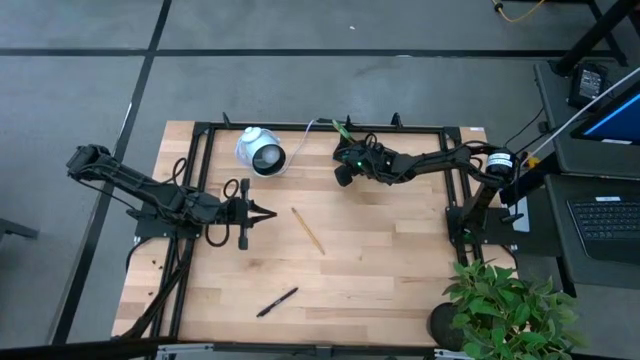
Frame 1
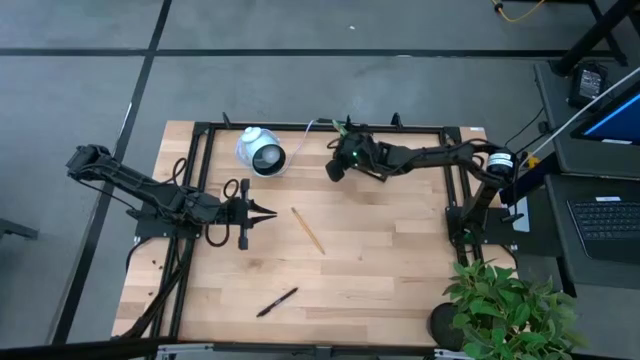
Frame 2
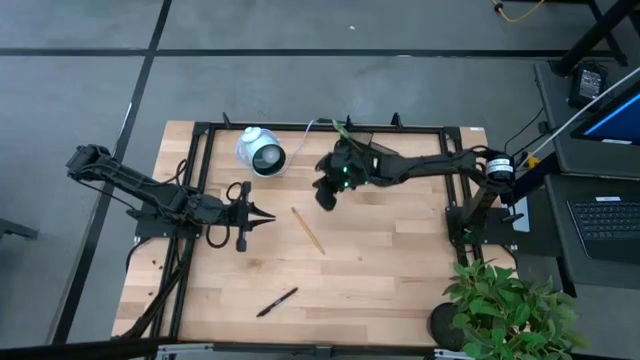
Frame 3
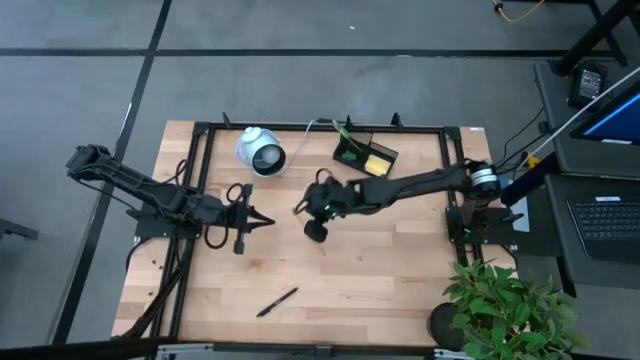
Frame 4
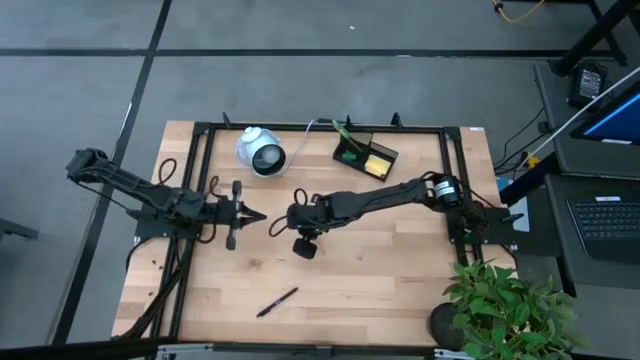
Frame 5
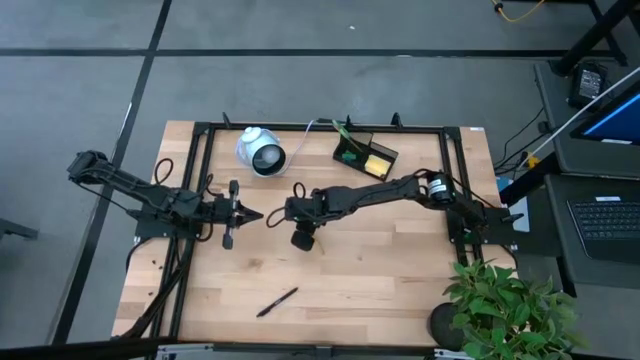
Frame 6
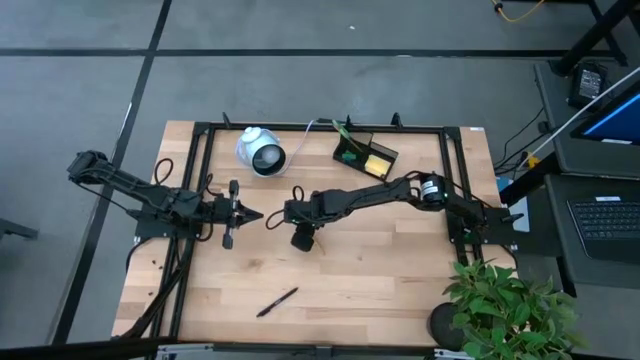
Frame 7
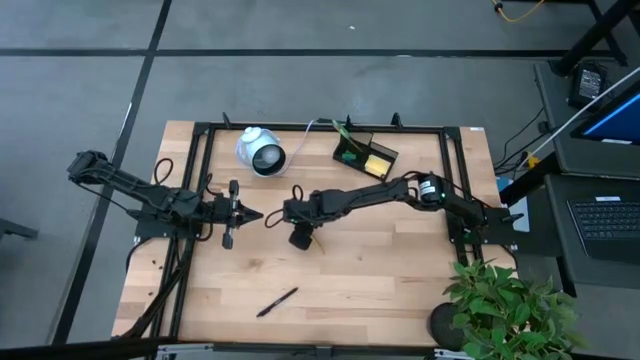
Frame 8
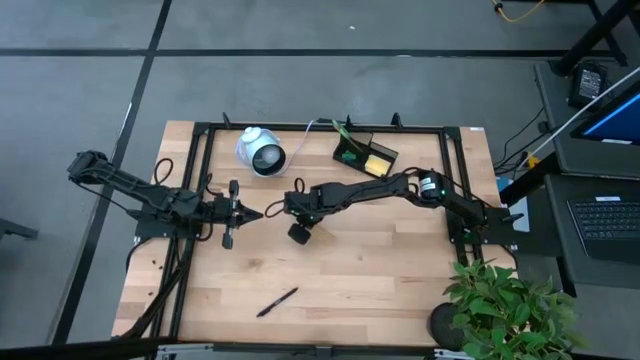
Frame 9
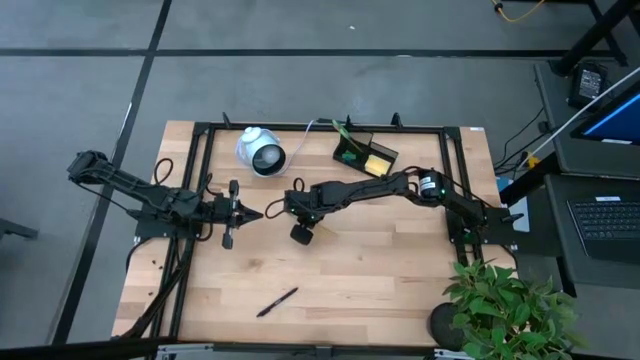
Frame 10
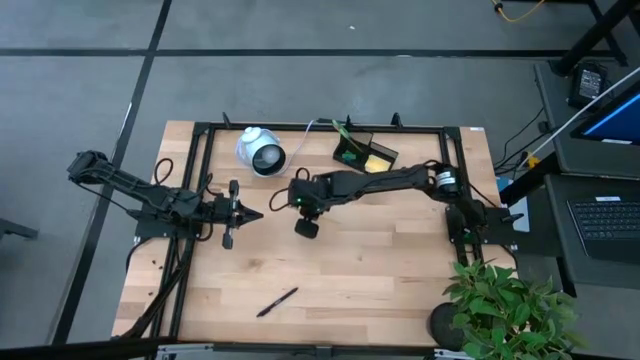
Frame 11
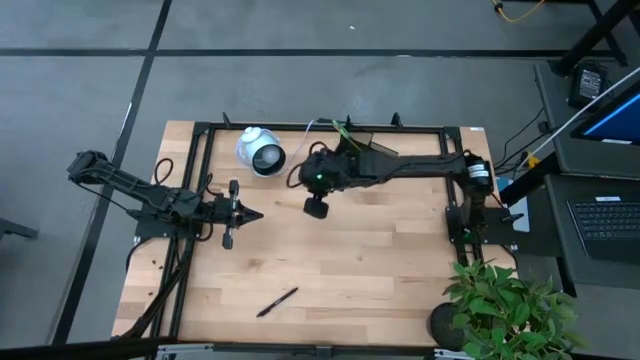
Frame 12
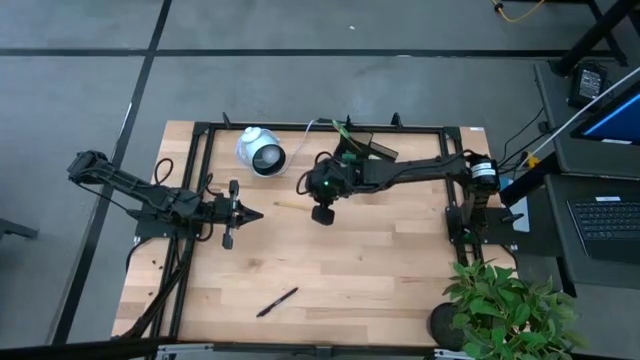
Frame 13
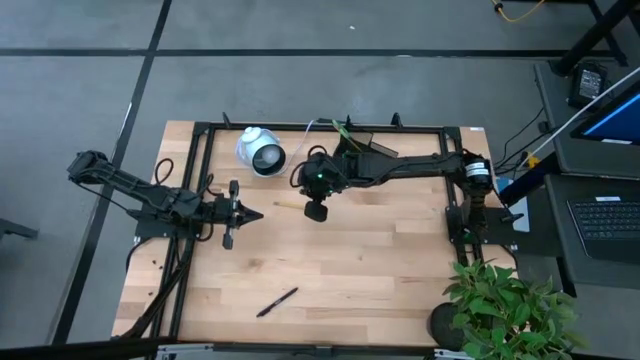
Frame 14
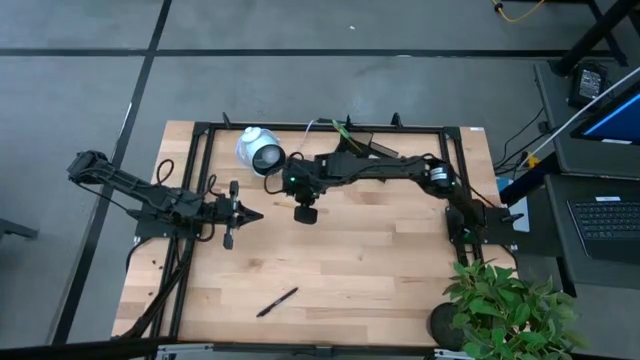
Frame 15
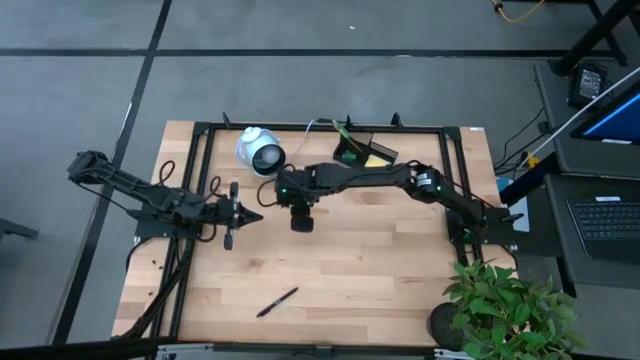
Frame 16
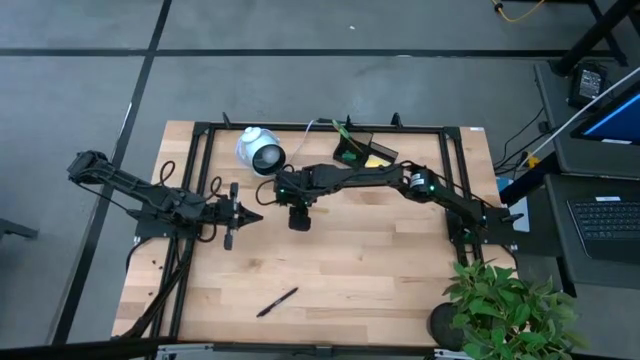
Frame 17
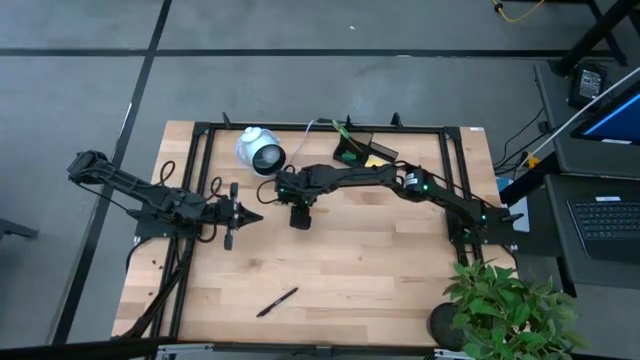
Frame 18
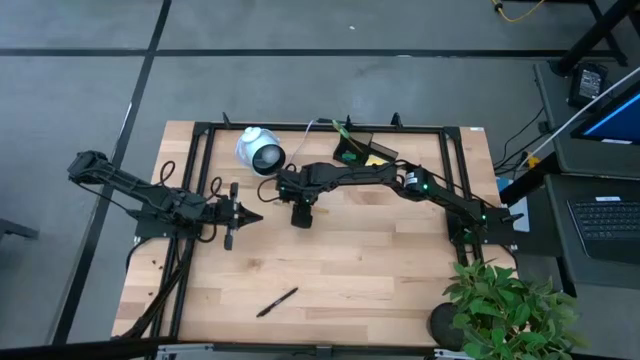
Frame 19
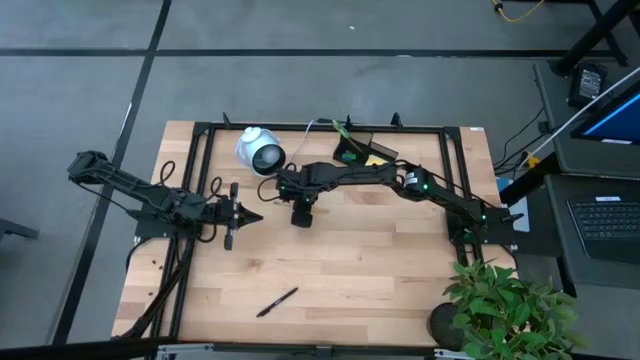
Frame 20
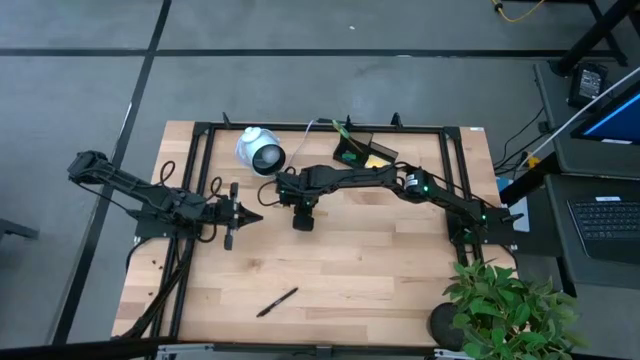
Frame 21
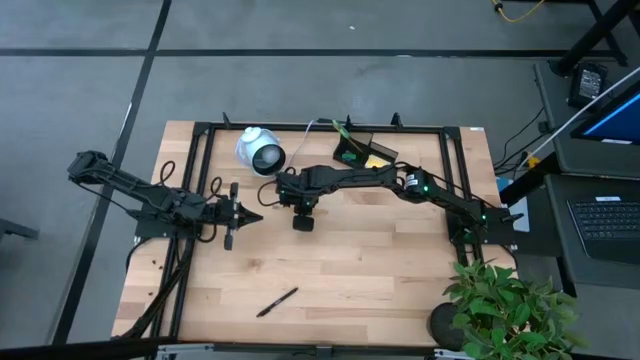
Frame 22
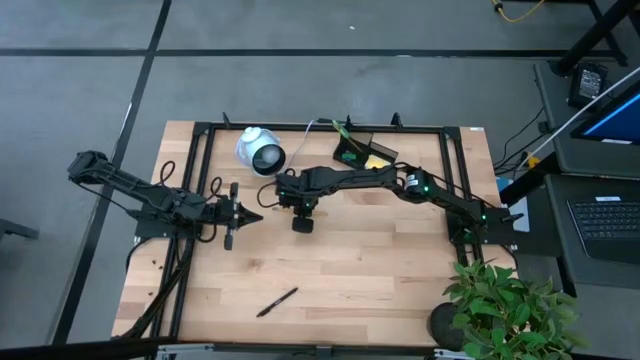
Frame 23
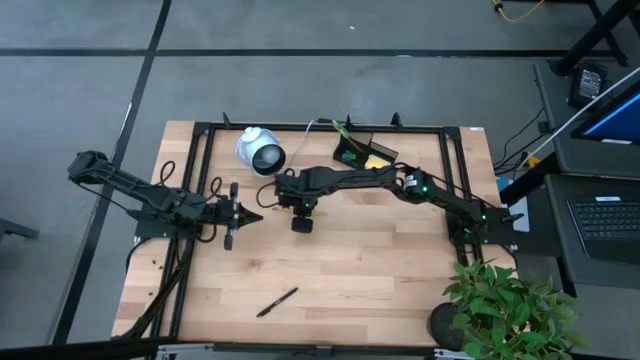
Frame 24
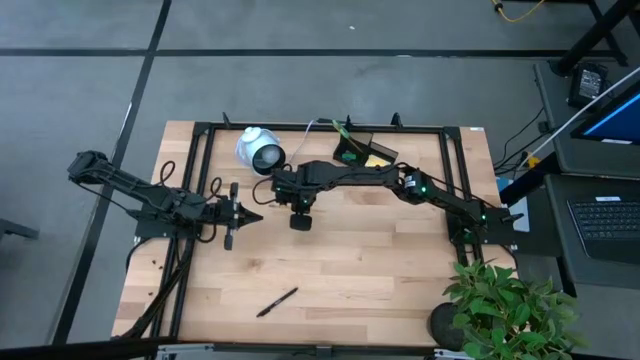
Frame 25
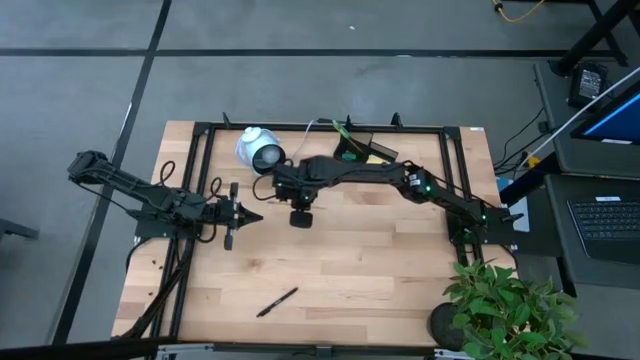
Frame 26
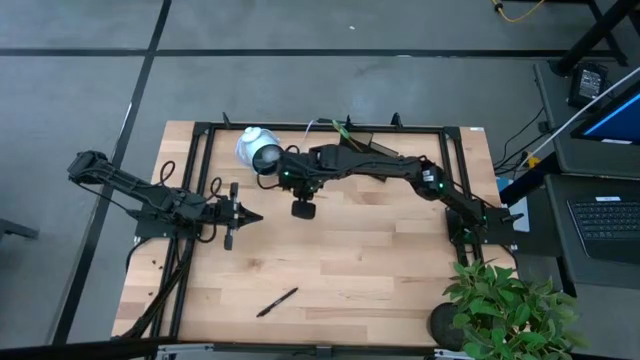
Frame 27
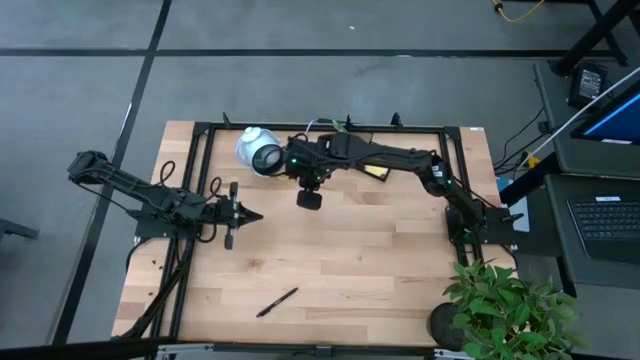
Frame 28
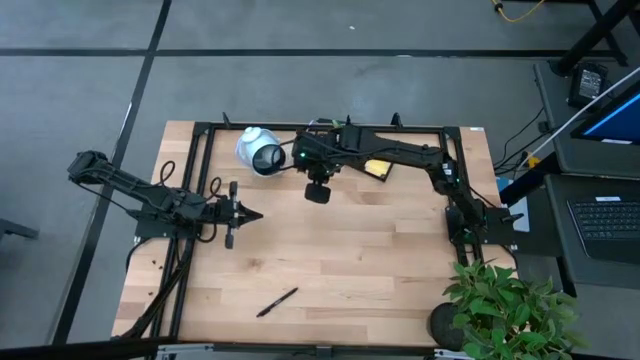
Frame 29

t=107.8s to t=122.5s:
Task: Pick and place office supplies into organizer
Put the yellow pencil into the desk organizer

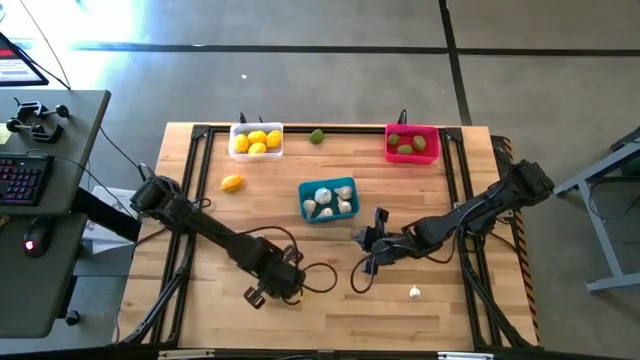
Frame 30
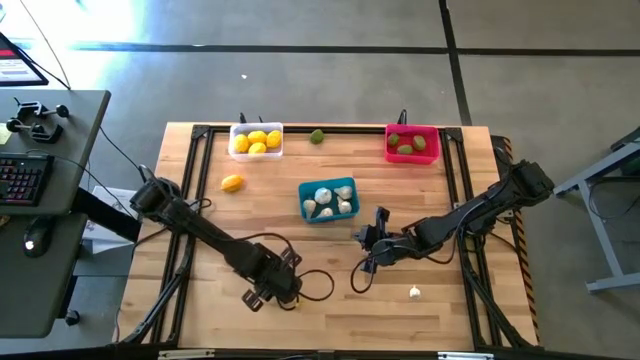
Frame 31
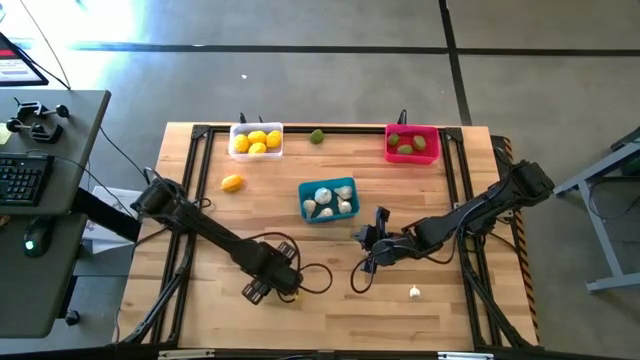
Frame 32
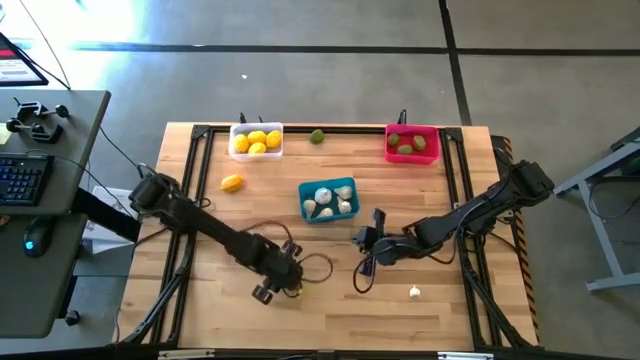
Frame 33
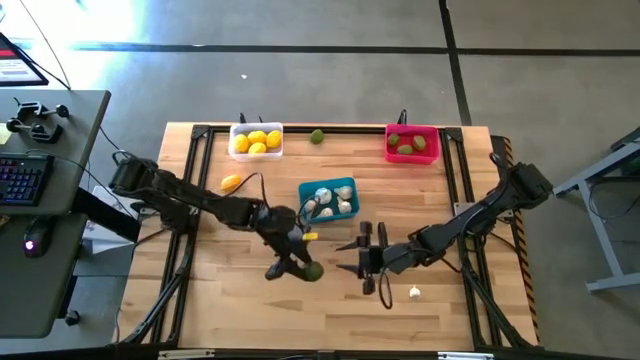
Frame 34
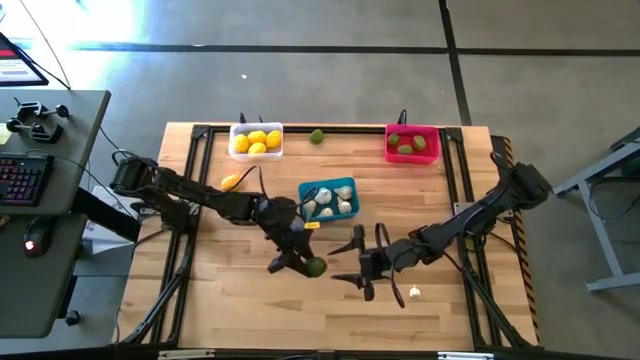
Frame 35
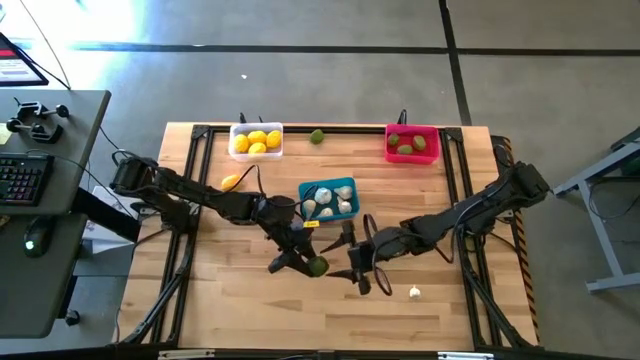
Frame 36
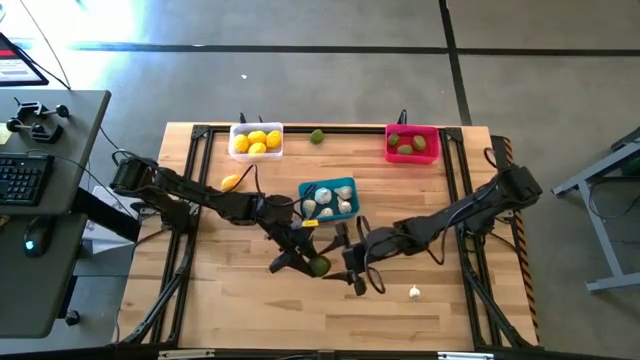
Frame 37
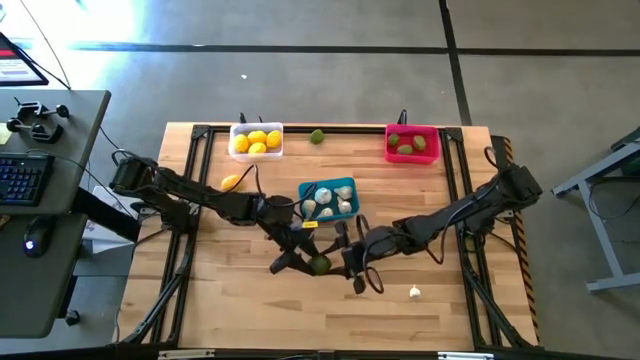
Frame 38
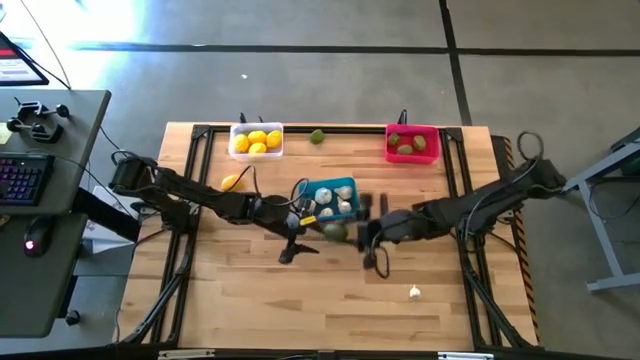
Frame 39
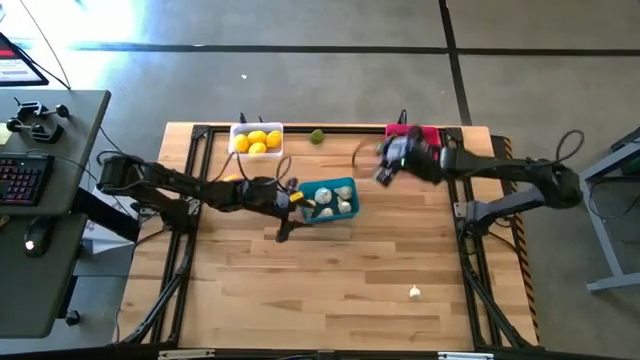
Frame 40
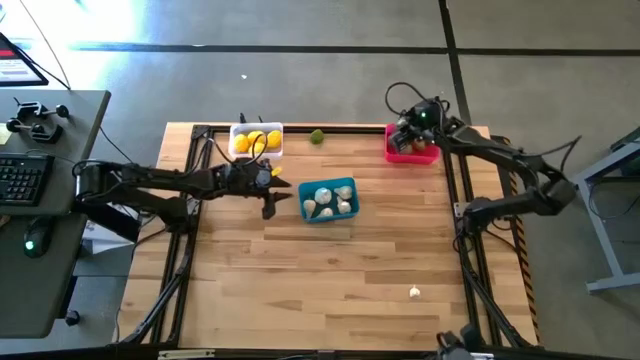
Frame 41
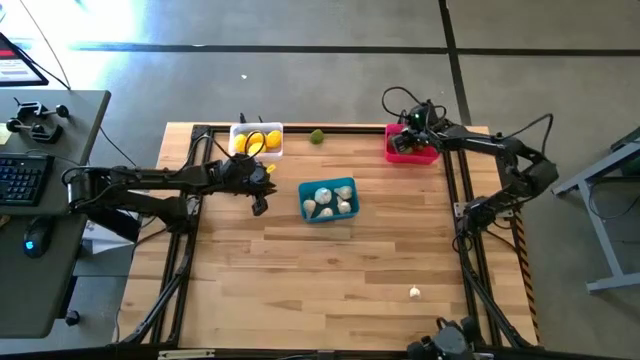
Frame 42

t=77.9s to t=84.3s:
Task: Sort produce into baskets
Put the green lime into the pink bin

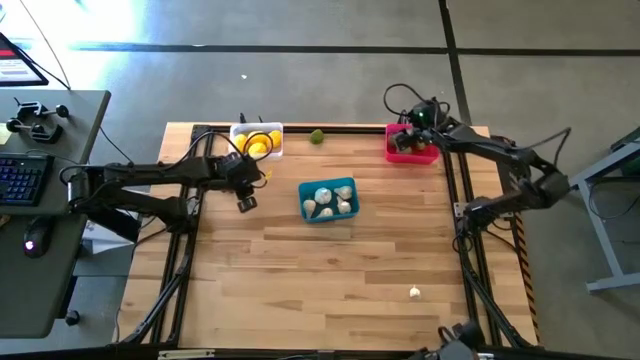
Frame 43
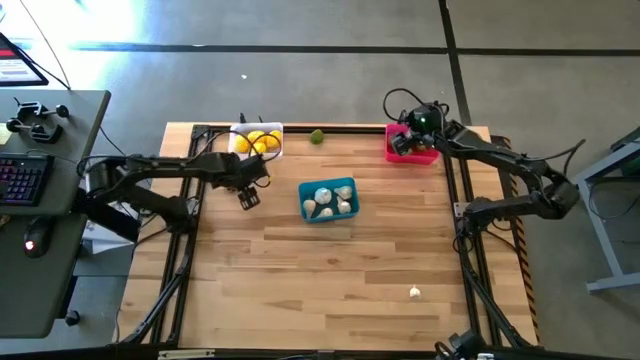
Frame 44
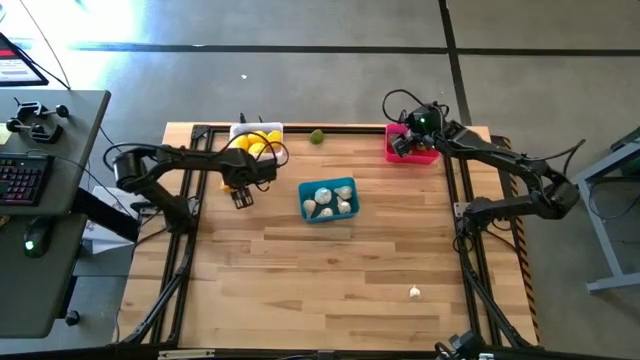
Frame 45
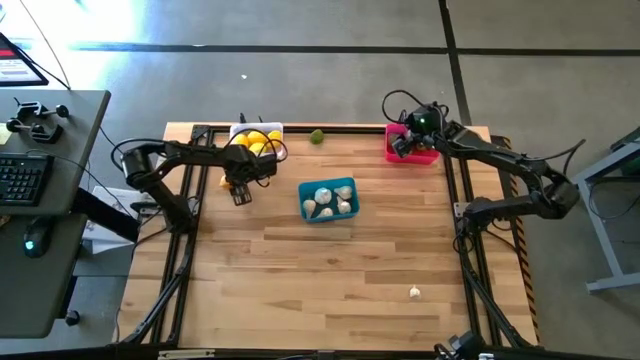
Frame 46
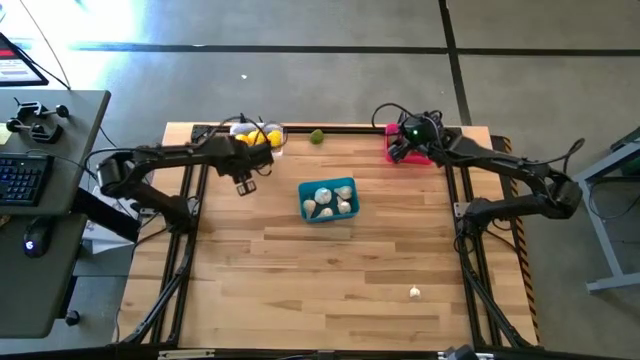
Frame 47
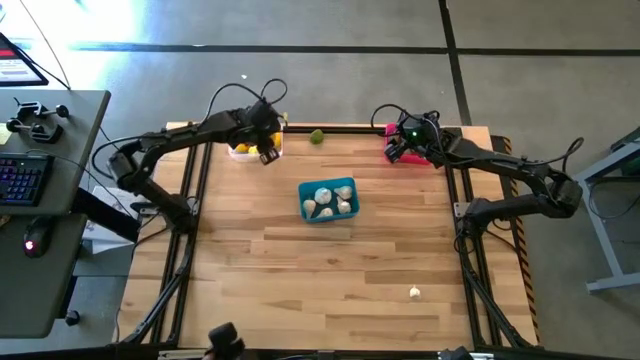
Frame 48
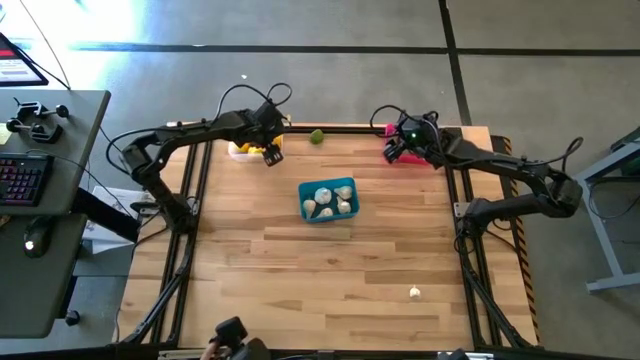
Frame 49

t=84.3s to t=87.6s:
Put the lemon into the transparent bin
